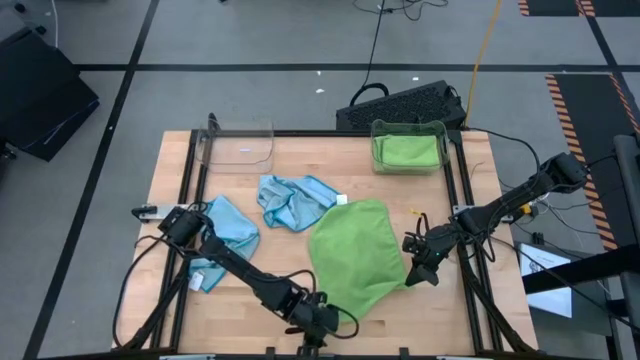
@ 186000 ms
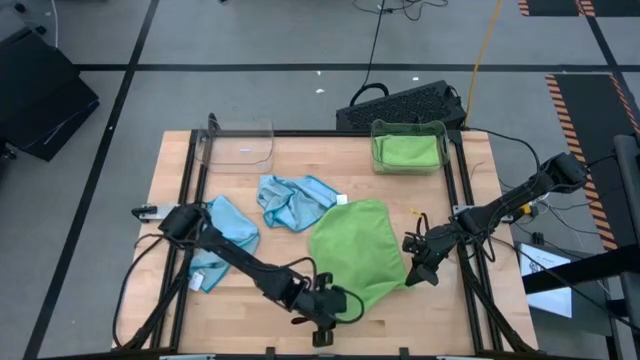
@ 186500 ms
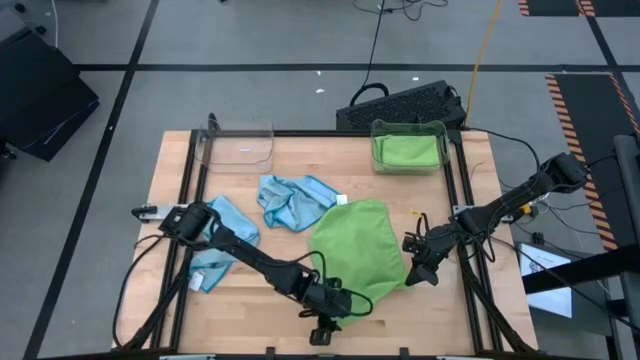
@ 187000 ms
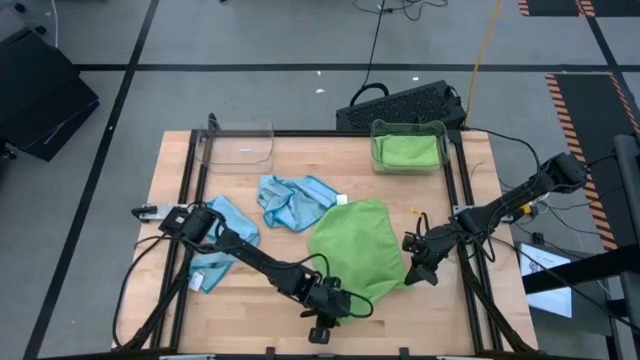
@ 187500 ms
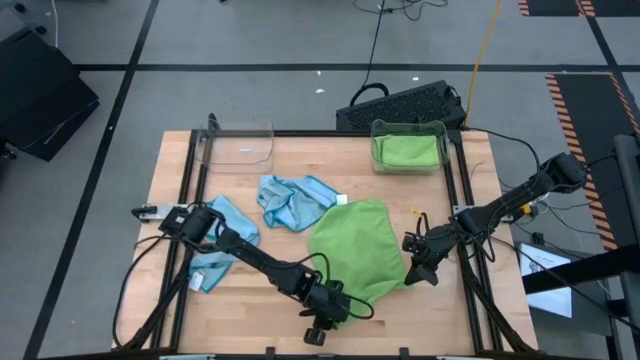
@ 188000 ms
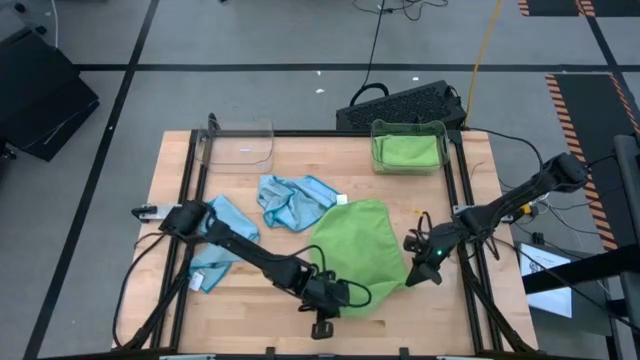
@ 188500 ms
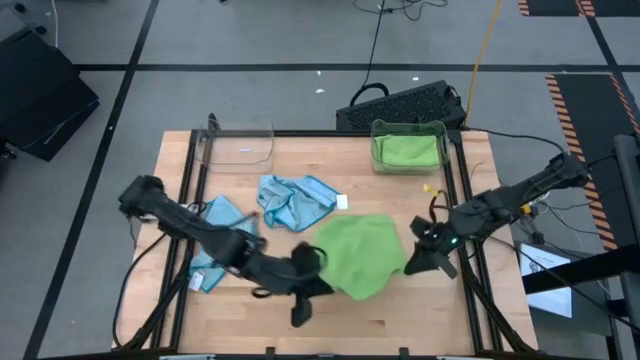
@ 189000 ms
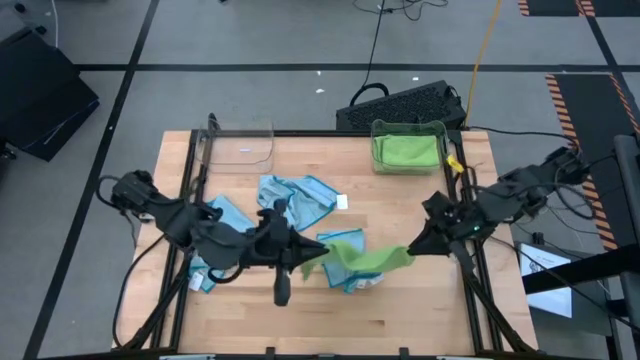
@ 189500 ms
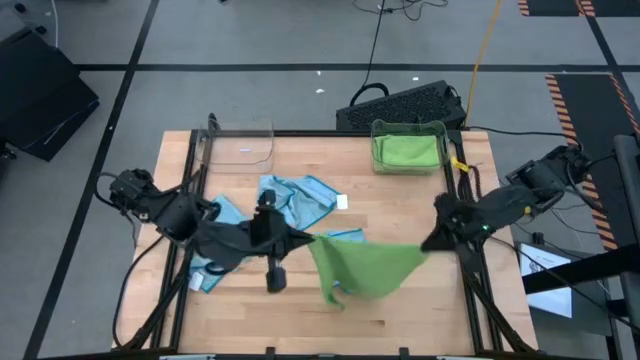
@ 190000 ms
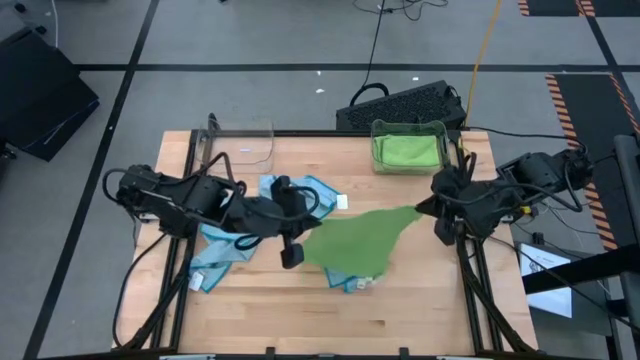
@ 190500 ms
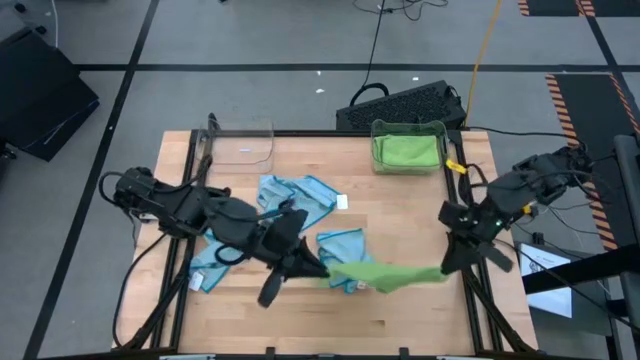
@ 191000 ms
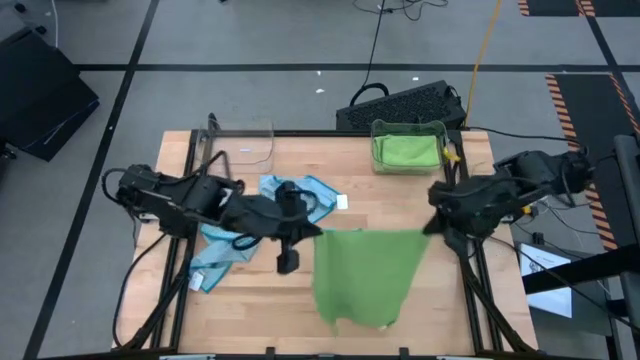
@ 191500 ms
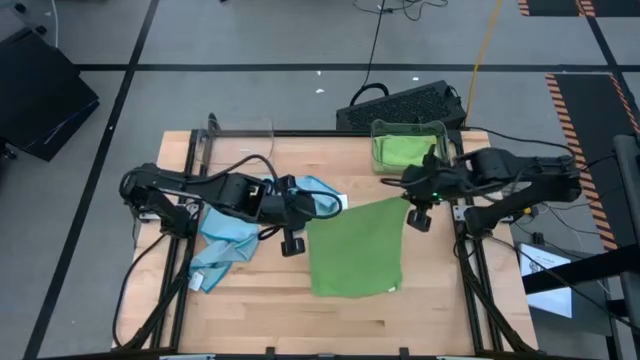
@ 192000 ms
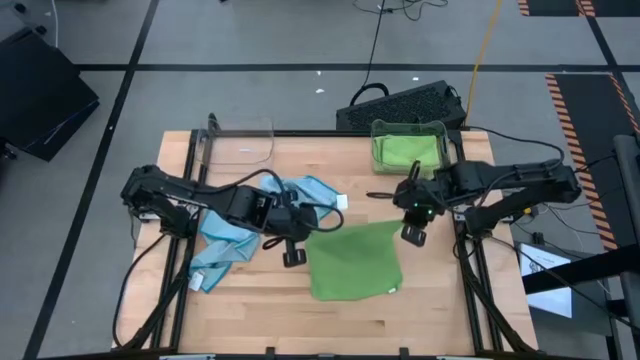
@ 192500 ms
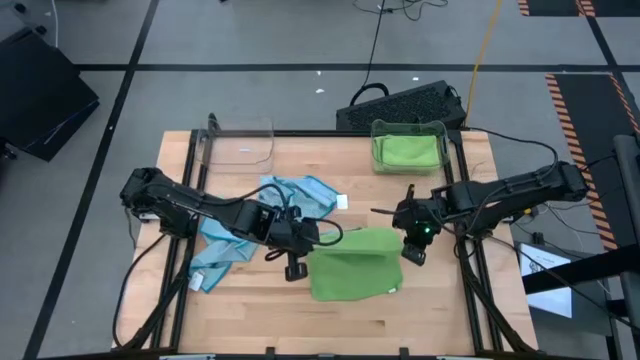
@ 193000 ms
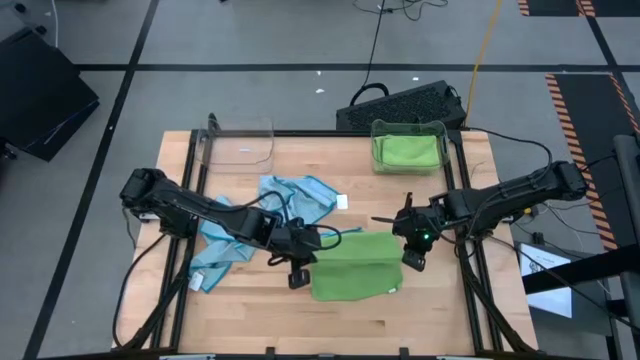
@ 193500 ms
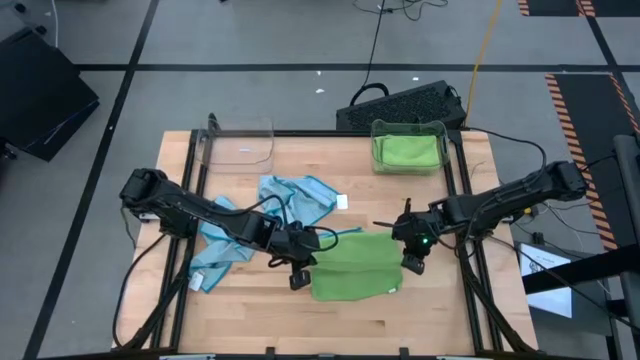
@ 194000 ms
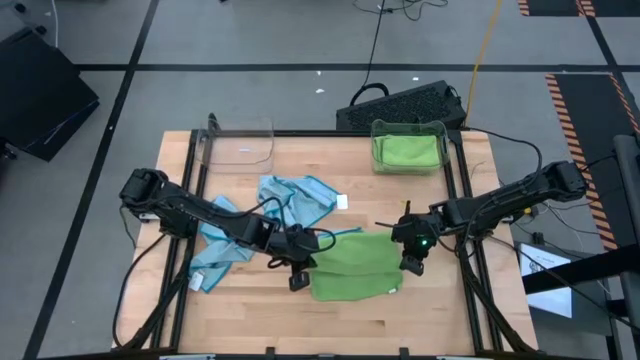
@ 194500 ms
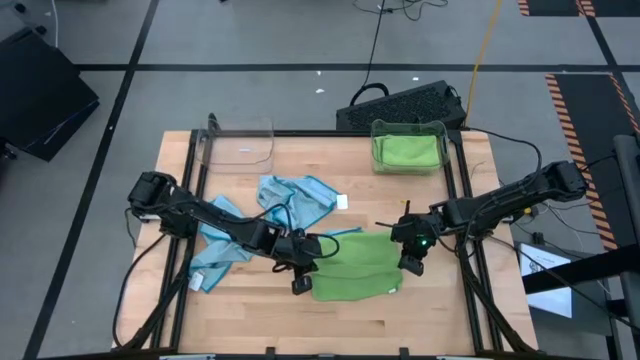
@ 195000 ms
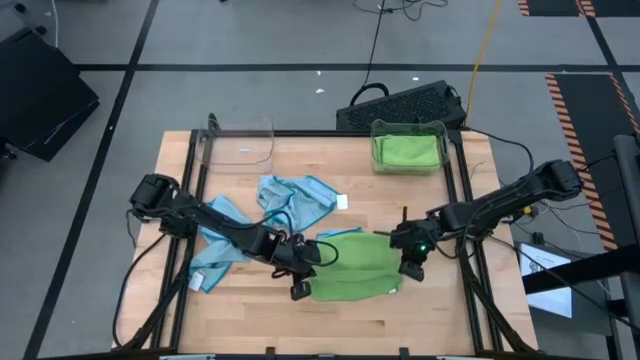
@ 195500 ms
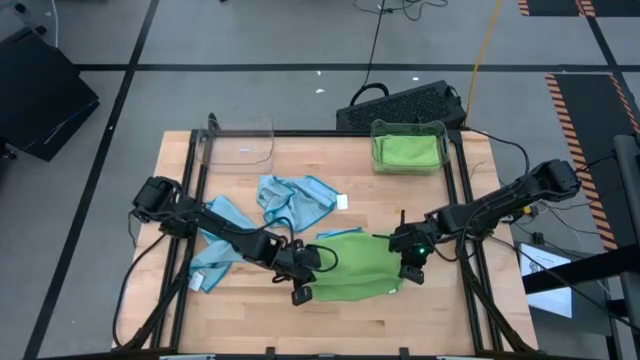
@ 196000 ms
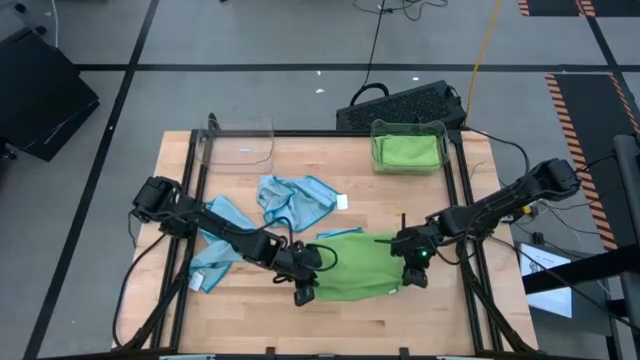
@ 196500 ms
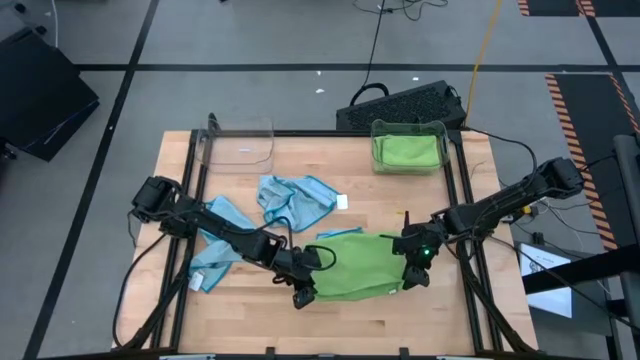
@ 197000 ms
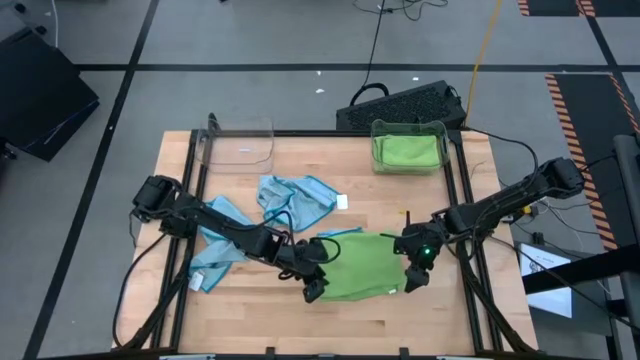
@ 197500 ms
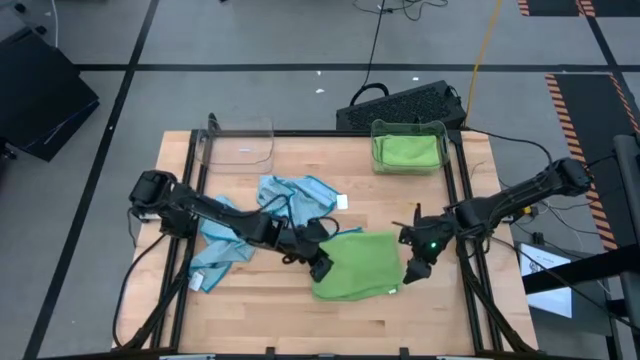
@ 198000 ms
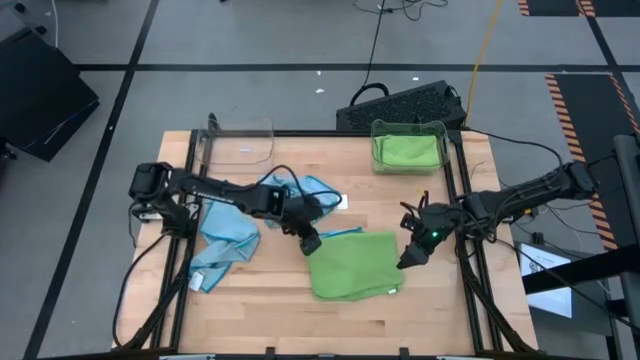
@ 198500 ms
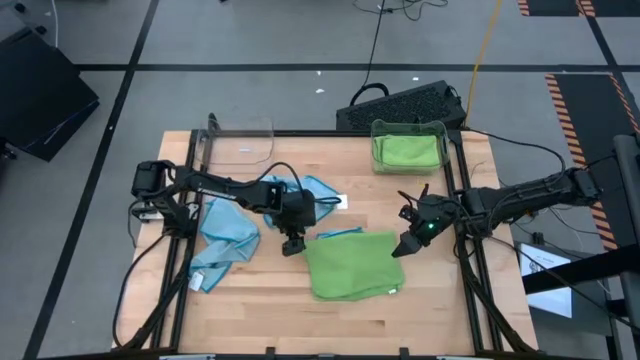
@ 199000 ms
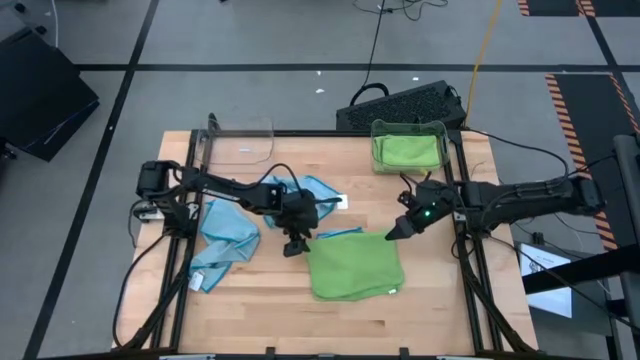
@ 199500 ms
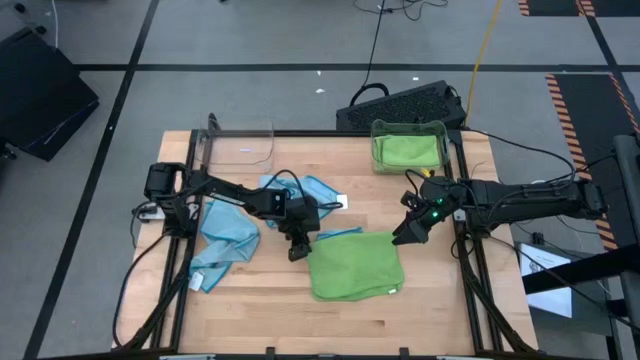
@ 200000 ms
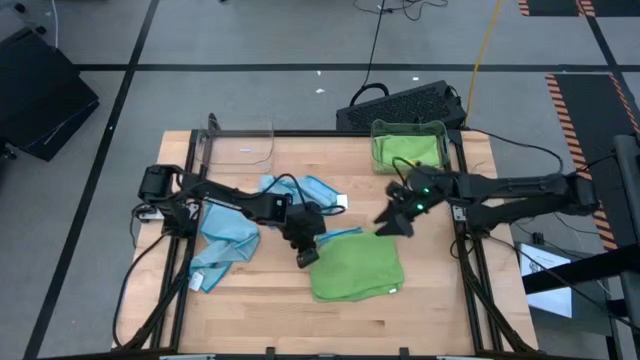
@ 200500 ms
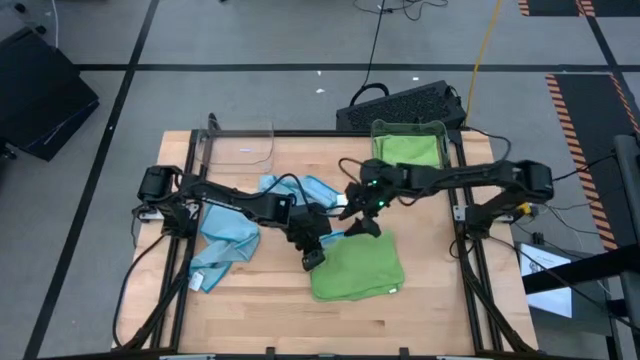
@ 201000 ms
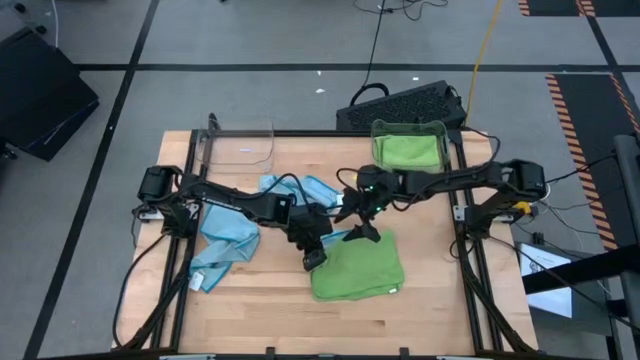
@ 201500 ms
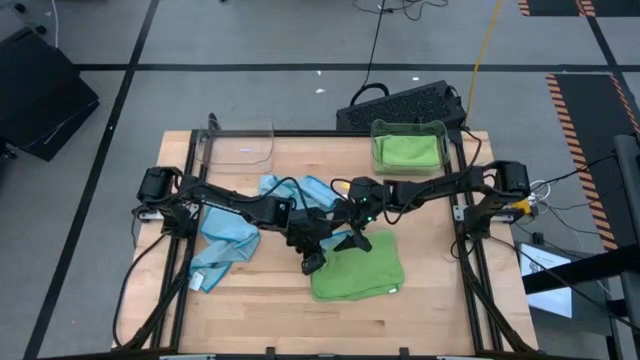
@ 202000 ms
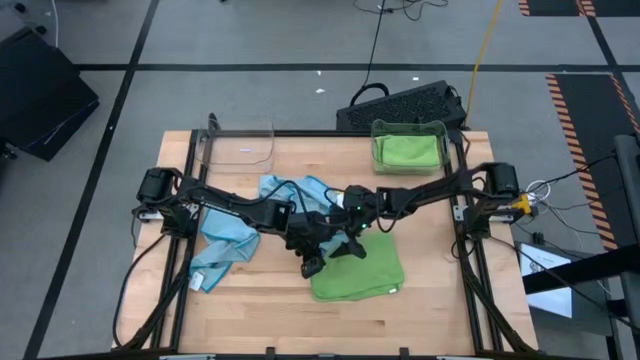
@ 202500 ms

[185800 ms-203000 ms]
Task: Sort microfiber towel by color & place in baskets
Fold the green towel

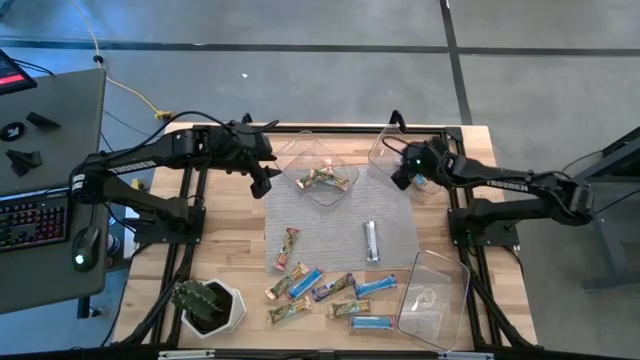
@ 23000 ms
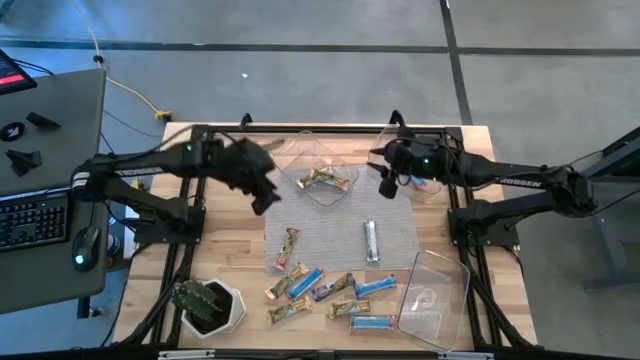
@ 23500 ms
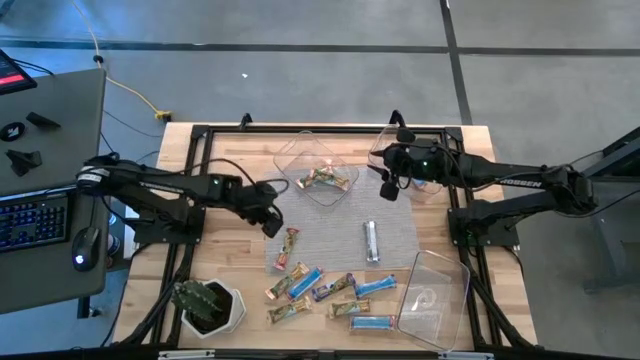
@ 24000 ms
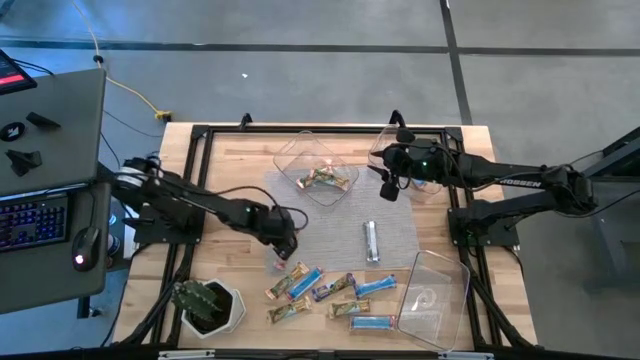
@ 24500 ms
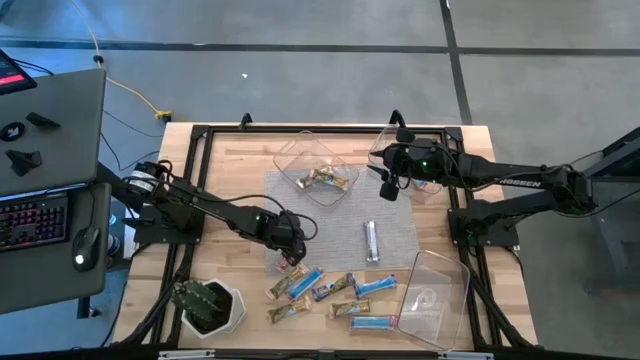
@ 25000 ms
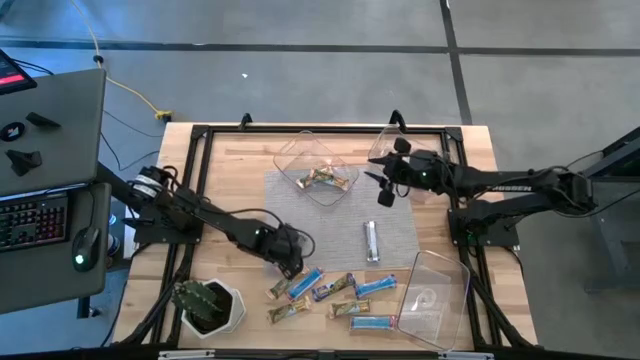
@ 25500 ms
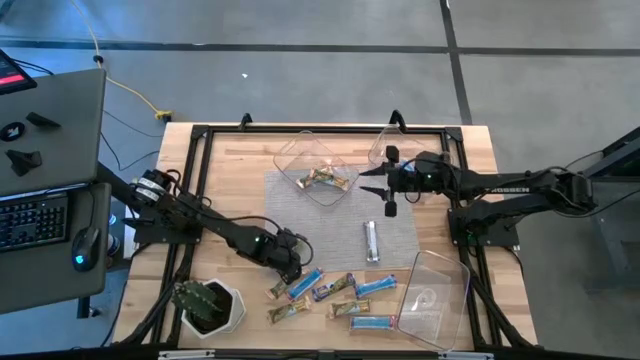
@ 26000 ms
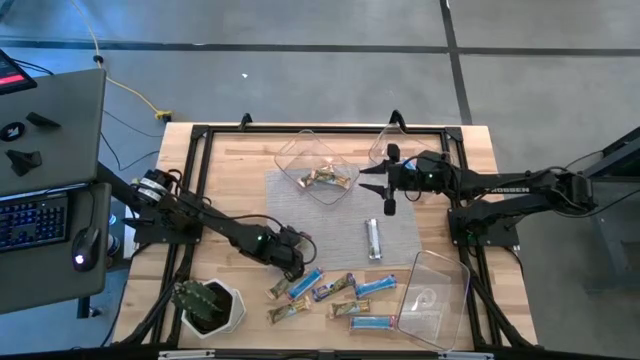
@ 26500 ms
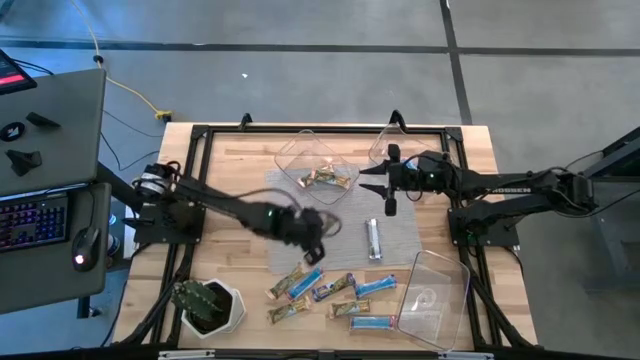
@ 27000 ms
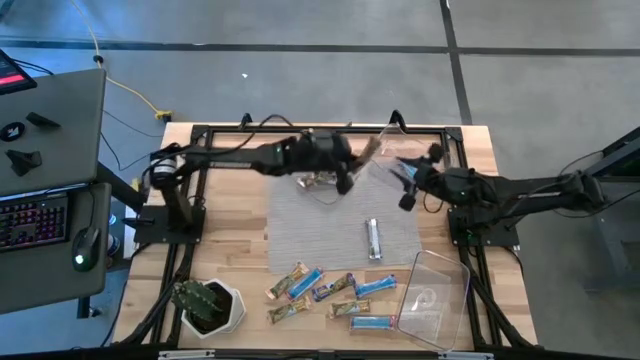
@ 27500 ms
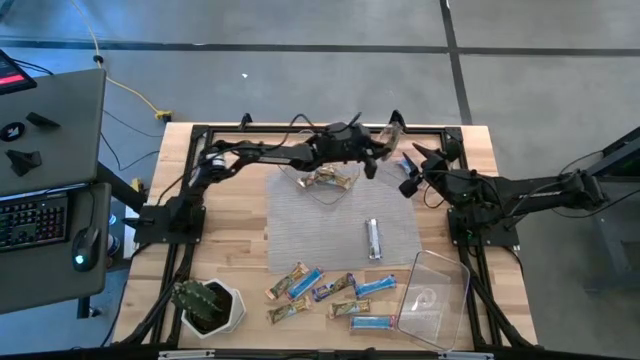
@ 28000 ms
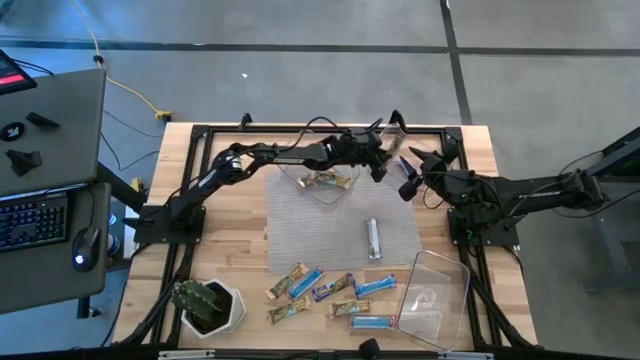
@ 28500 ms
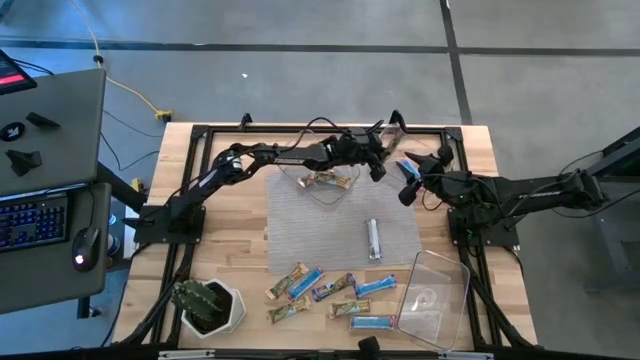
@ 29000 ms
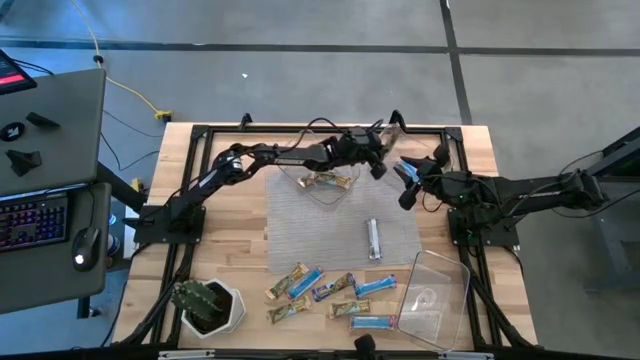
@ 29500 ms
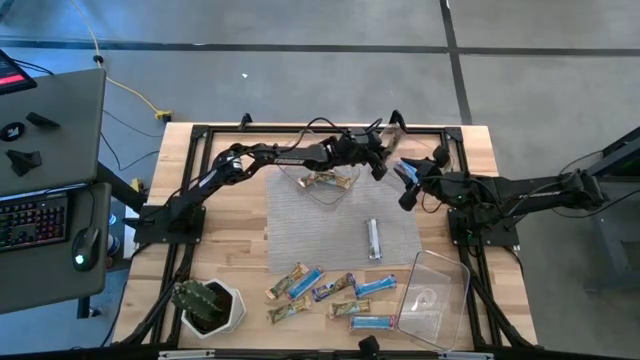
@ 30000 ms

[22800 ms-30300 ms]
Task: Pick and place Granola Bars by type
Put the red granola bar into the top right transparent bin
